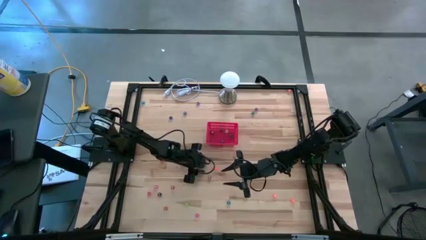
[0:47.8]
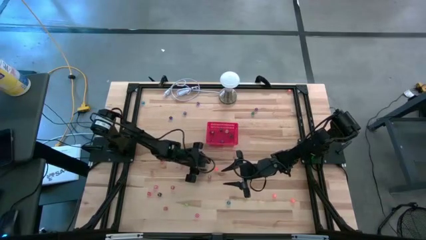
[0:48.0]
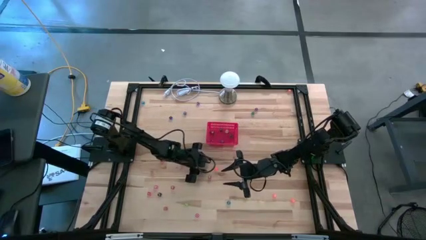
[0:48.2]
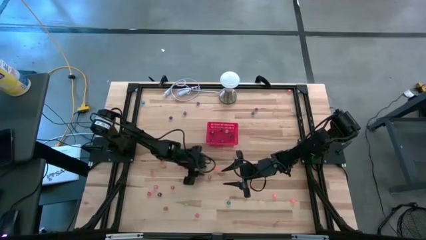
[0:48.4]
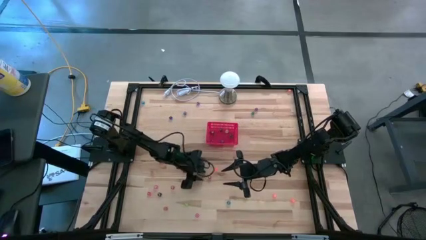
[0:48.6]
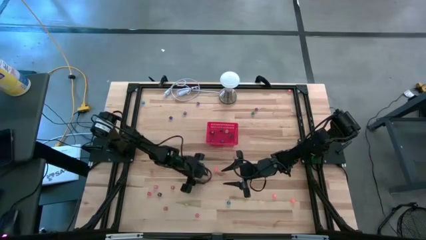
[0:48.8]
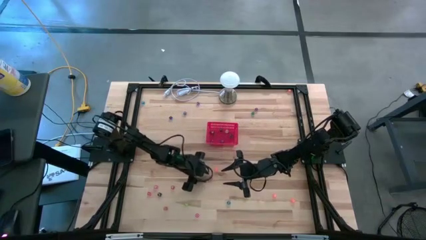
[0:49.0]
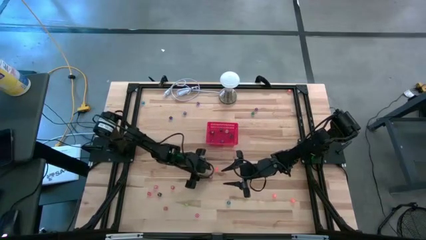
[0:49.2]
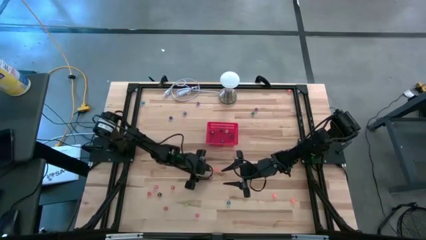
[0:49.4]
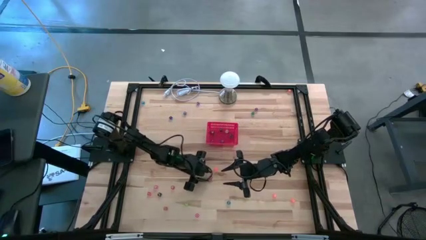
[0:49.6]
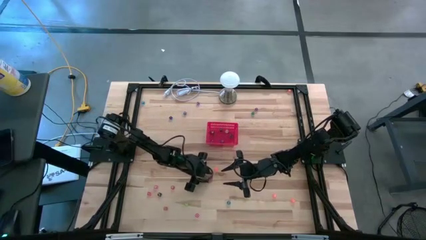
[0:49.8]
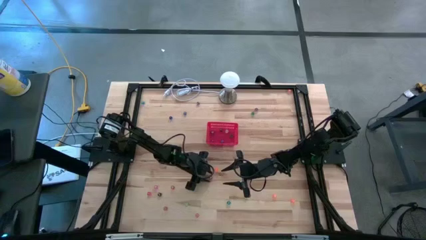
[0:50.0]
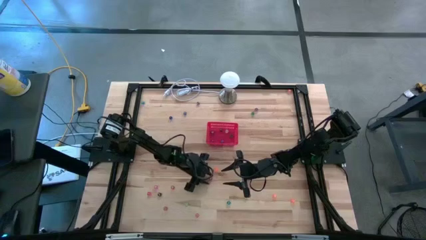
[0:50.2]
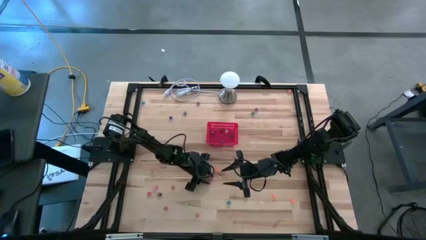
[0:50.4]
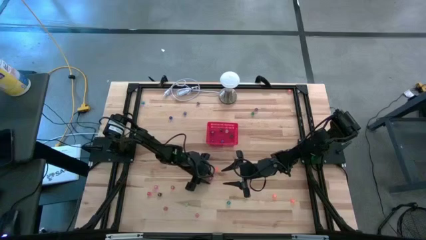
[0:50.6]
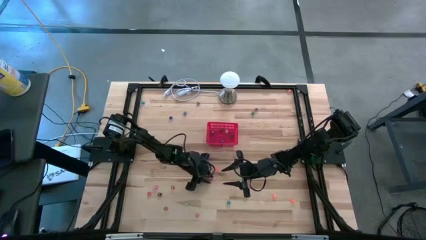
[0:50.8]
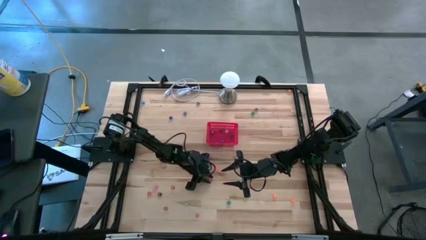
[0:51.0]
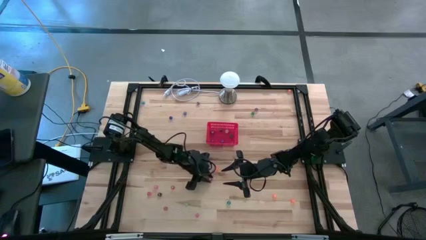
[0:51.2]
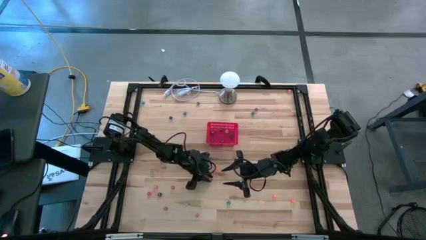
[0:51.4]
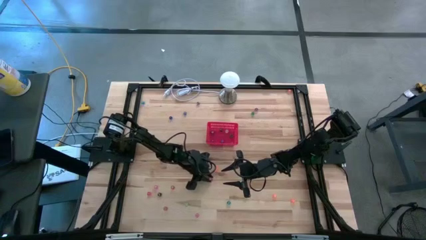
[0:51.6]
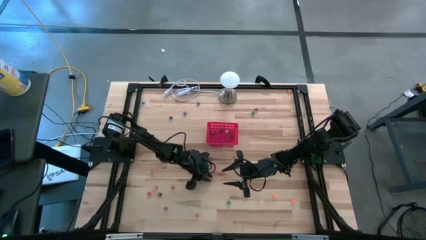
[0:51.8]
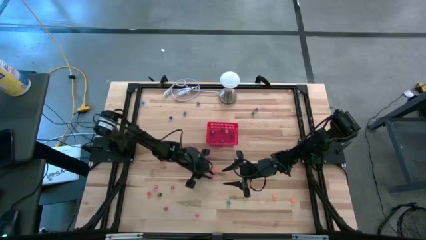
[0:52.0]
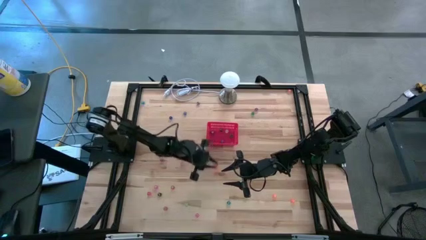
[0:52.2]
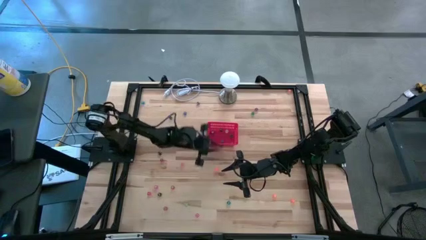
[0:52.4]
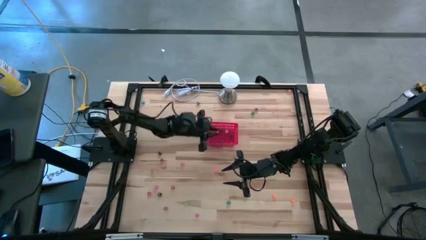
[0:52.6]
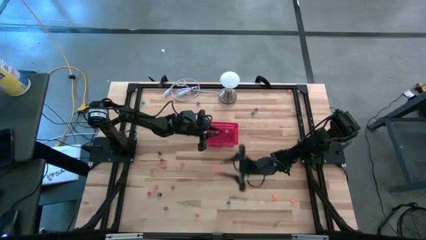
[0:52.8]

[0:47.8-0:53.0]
Task: Pick & Place Dice
Put the red dice into the bin

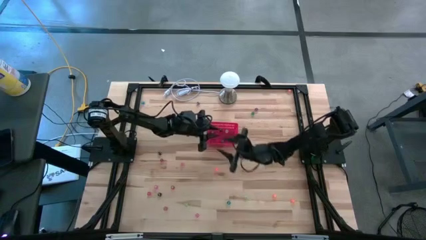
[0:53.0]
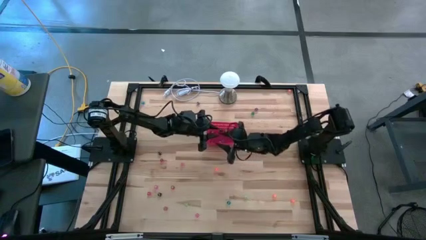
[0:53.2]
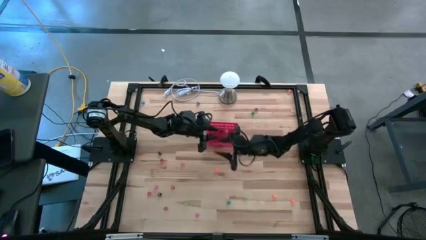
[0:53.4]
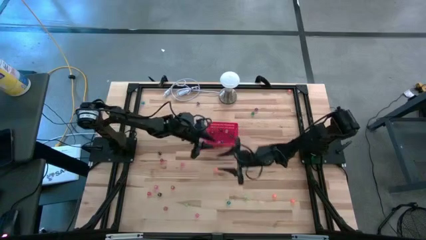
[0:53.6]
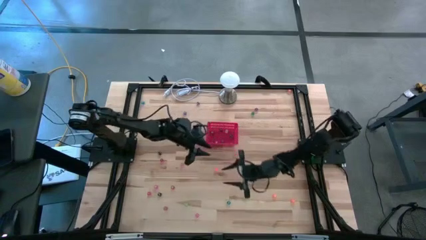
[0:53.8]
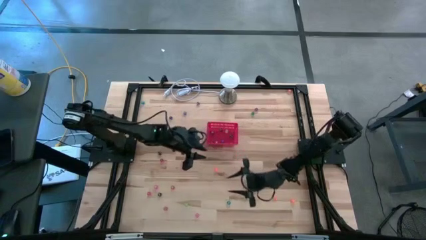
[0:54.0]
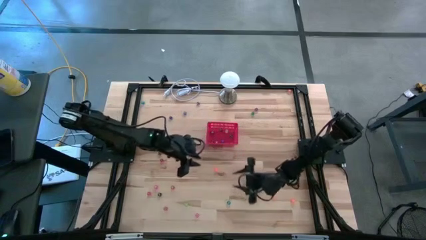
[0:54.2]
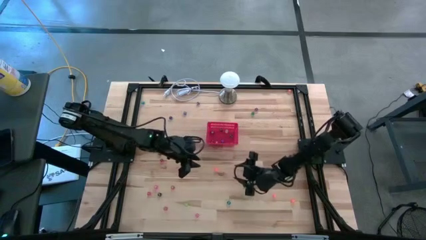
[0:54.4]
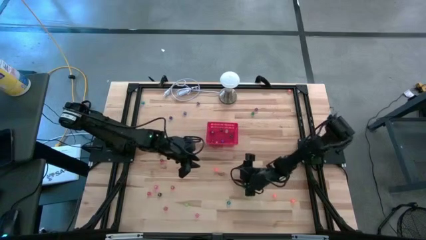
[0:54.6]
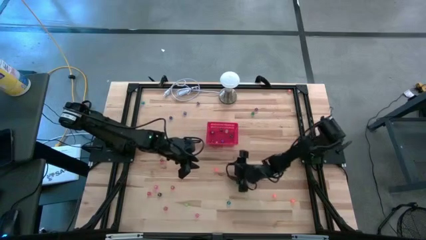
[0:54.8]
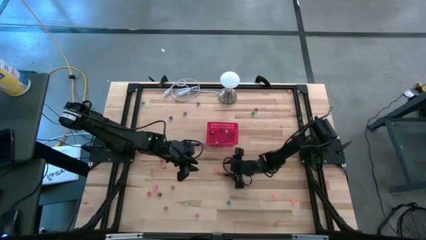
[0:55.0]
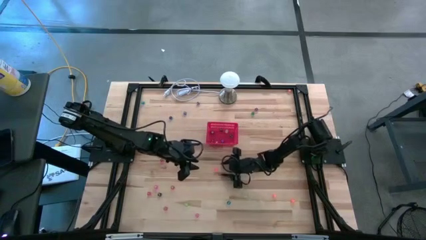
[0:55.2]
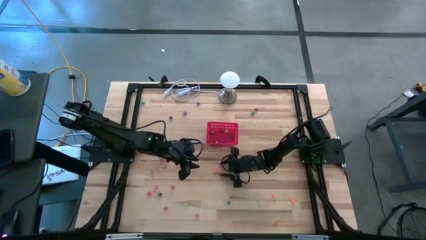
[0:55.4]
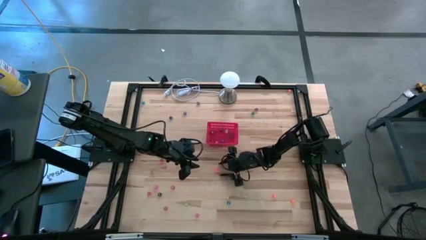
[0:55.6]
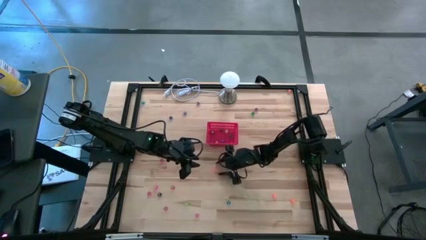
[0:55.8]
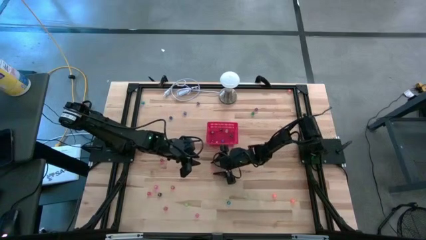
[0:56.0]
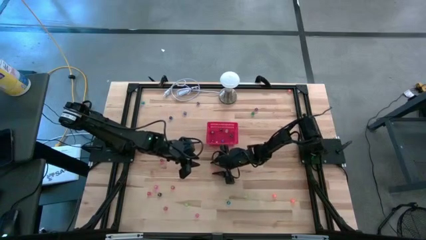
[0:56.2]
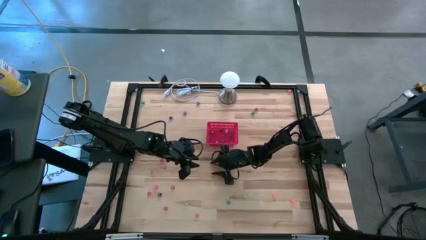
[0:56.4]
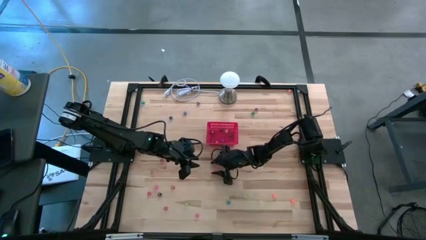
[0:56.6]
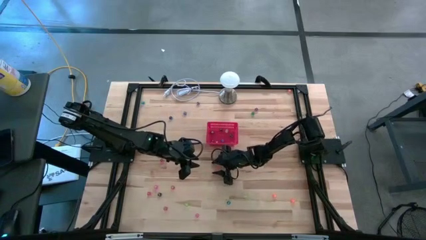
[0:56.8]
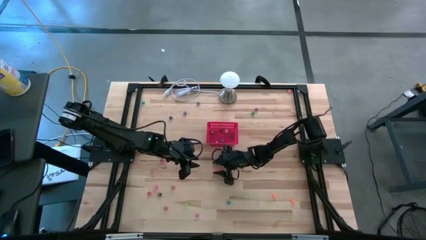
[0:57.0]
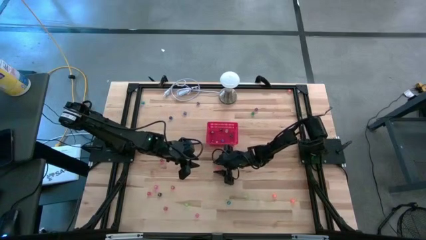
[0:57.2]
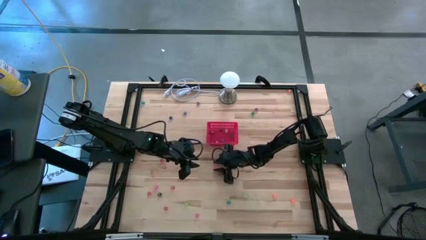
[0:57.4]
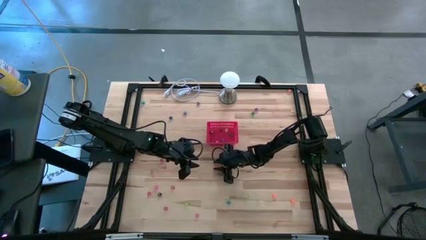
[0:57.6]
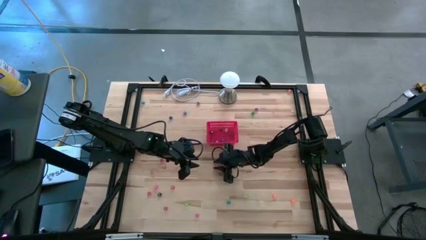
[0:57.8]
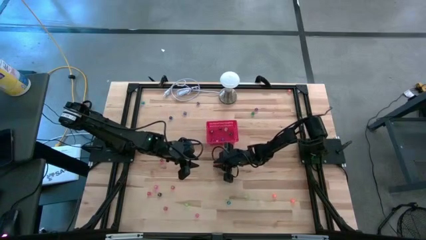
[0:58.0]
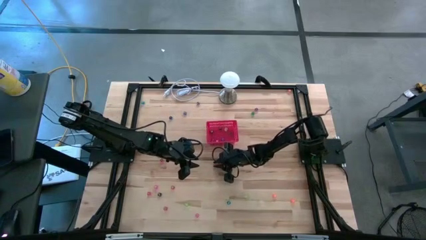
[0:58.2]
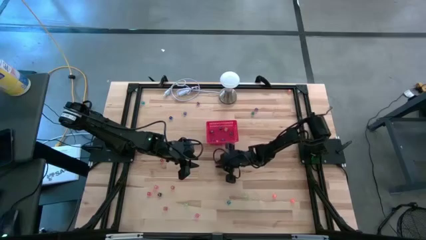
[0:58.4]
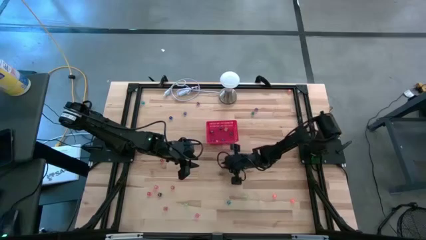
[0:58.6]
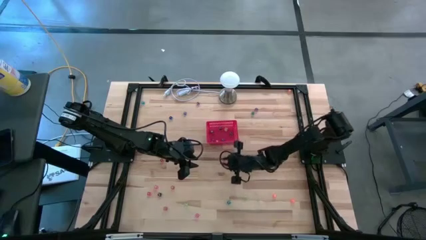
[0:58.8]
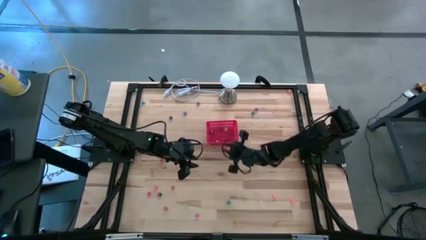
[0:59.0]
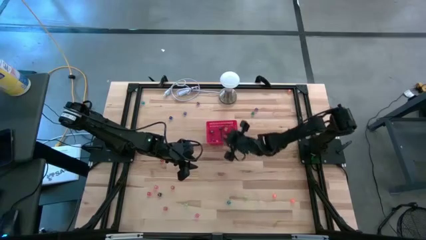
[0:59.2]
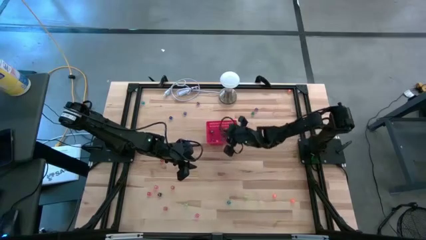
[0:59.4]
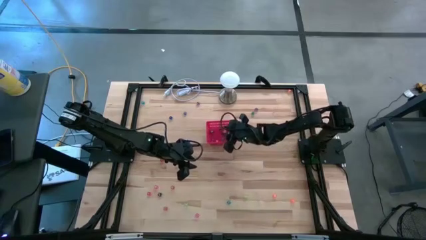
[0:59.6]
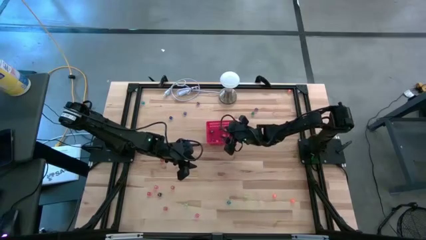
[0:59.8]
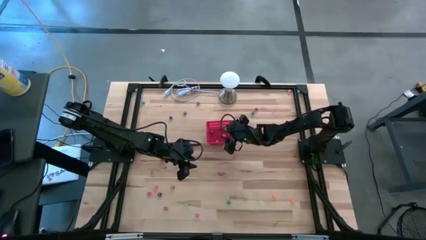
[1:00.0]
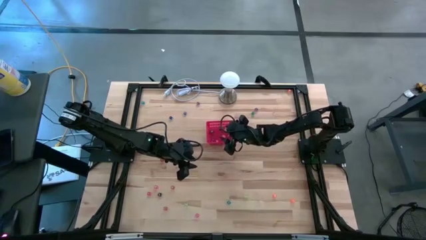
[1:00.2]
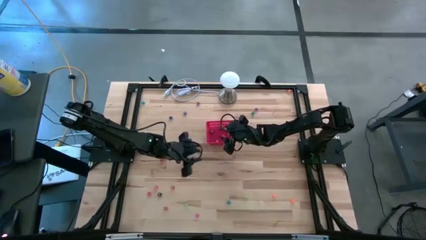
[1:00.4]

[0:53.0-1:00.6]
Put the orange dice into the bin

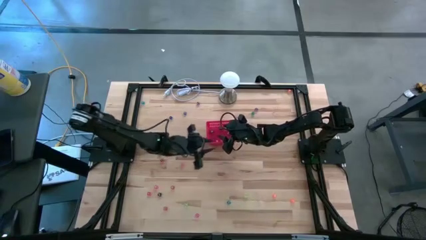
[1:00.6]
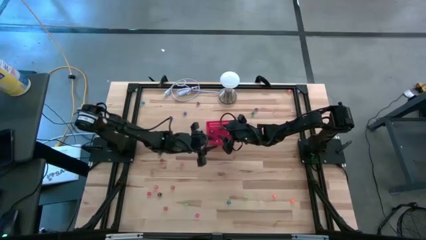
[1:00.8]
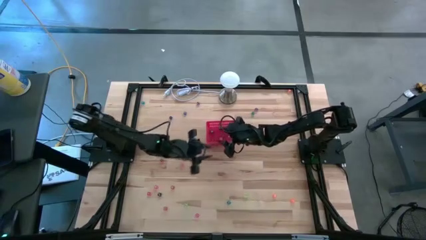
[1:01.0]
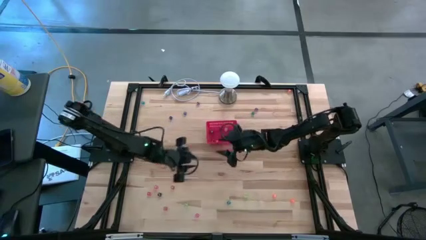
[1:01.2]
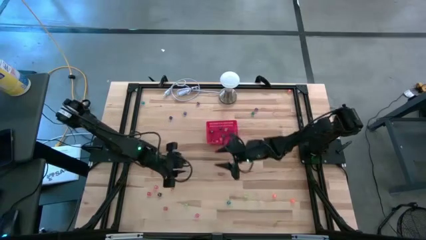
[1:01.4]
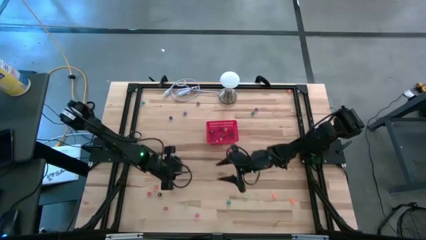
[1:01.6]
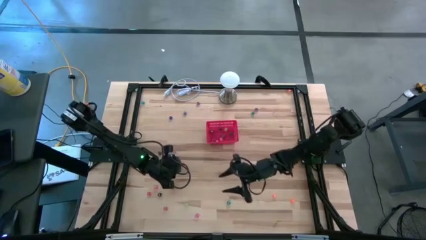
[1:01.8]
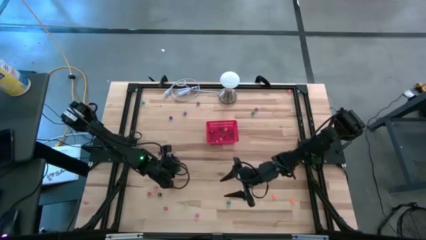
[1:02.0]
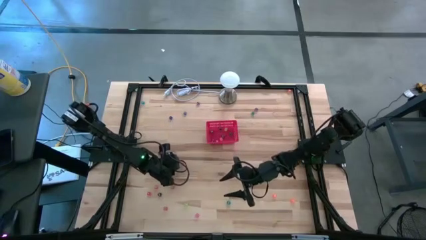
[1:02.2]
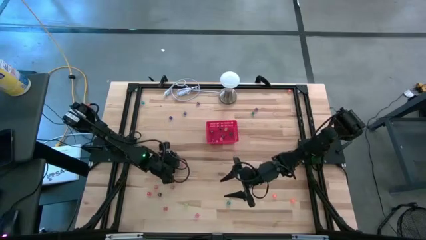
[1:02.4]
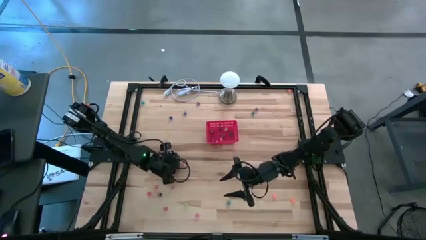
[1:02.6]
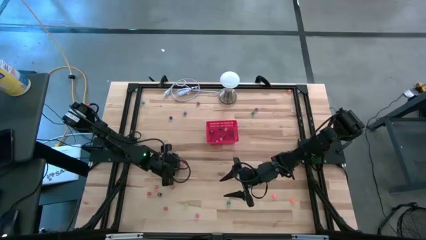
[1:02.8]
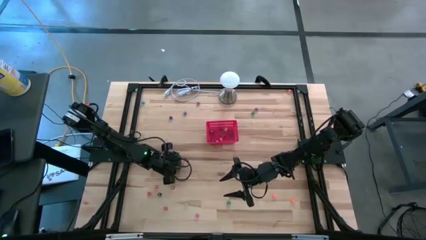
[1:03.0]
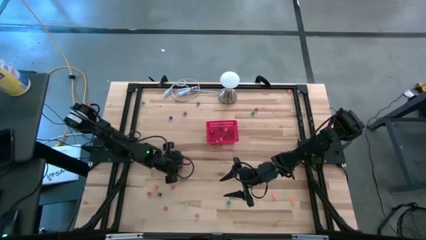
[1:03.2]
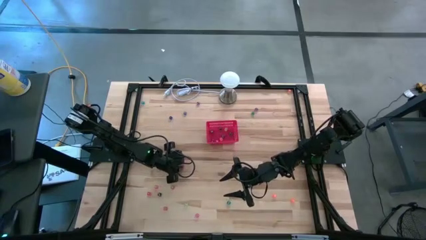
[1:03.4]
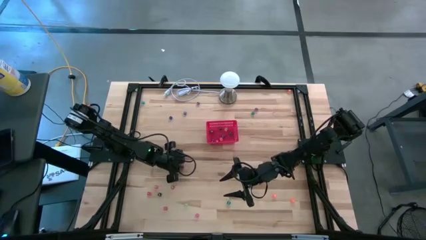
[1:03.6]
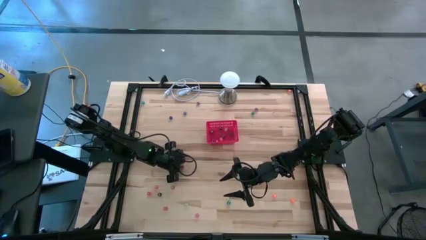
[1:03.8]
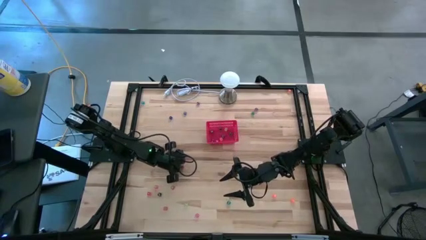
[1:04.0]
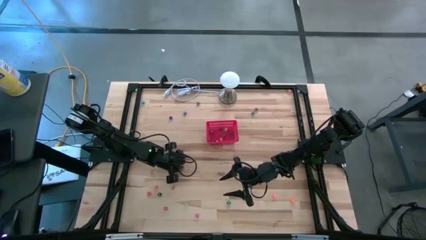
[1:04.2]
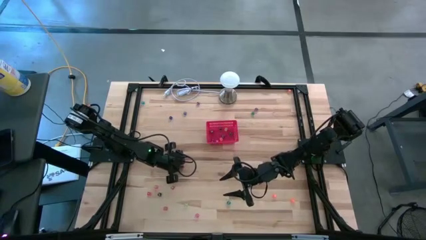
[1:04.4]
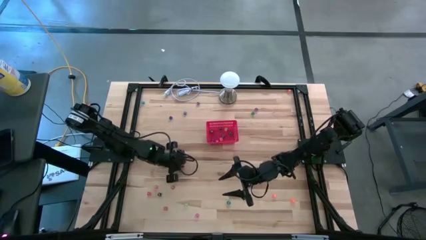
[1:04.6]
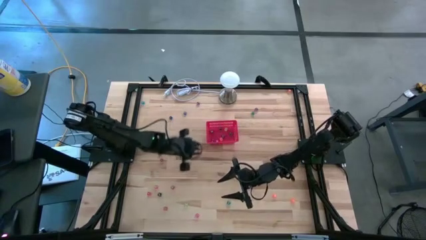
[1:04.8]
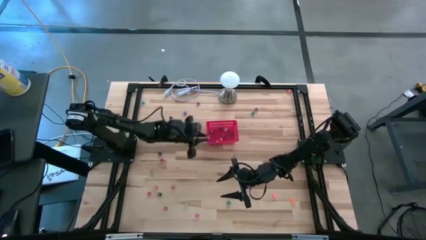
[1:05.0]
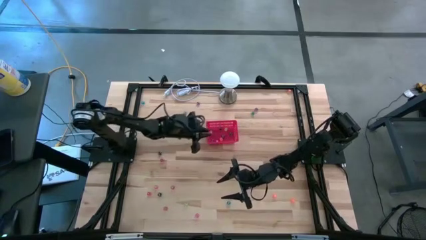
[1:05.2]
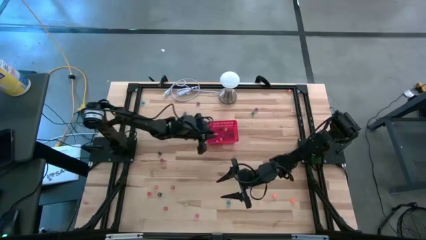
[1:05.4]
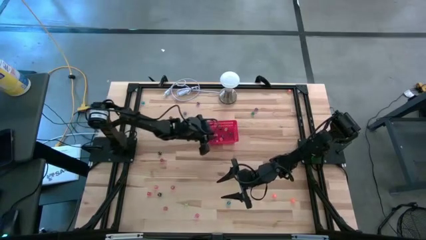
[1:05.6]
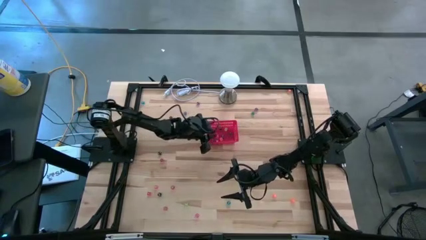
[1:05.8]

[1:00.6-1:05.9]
Put the pink dice into the bin
